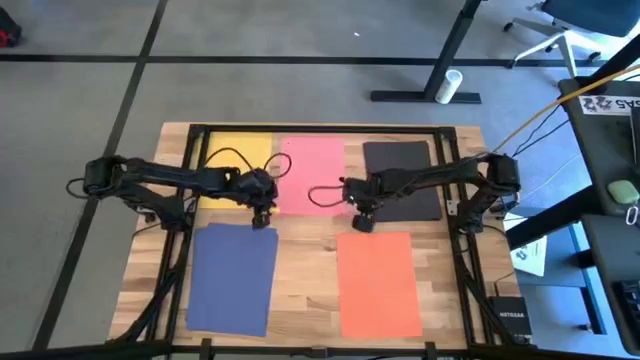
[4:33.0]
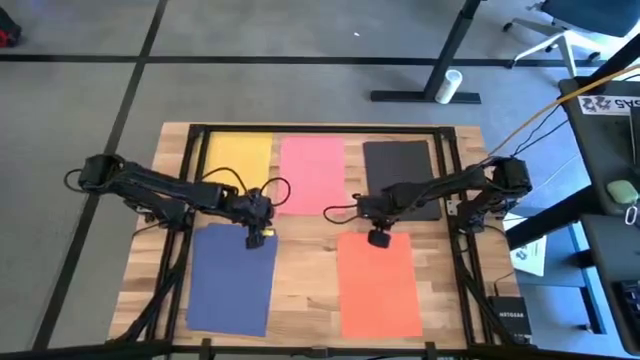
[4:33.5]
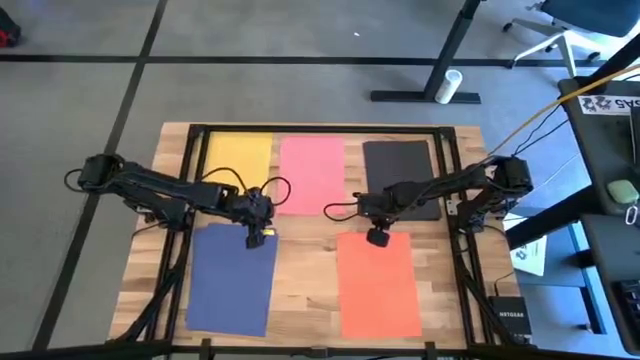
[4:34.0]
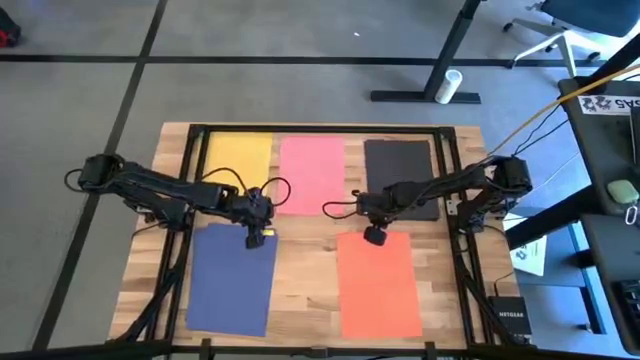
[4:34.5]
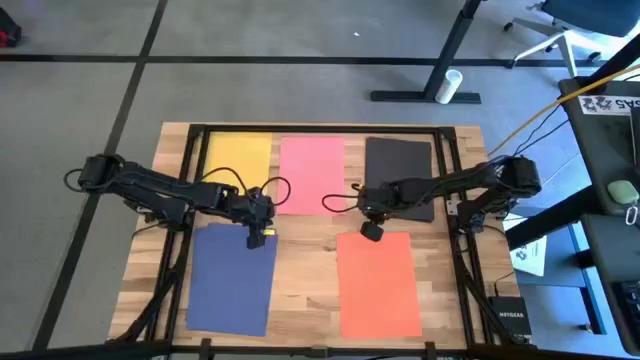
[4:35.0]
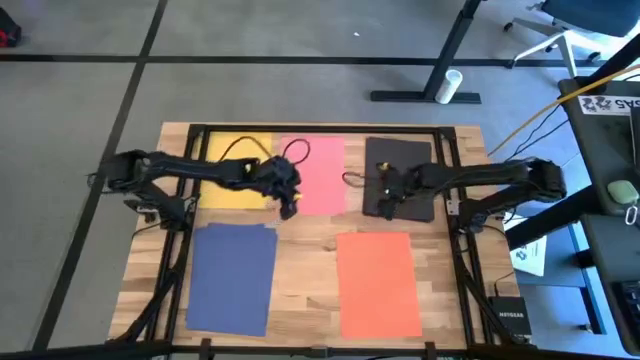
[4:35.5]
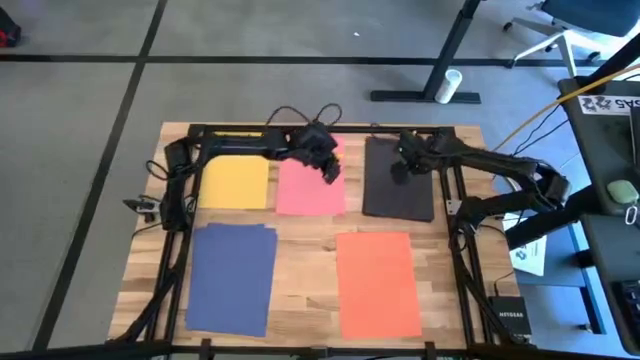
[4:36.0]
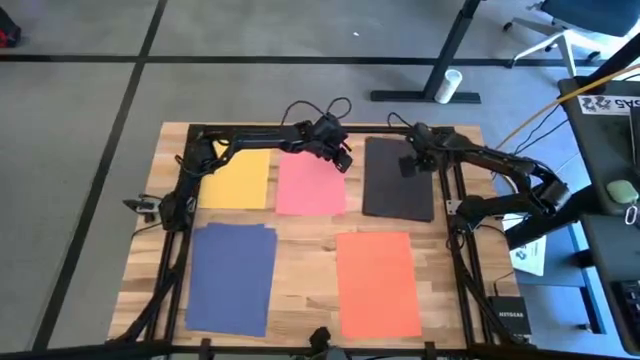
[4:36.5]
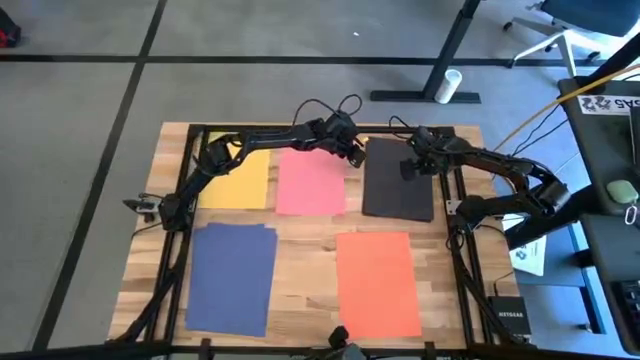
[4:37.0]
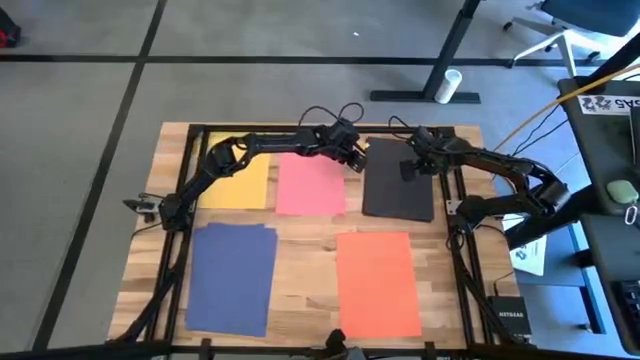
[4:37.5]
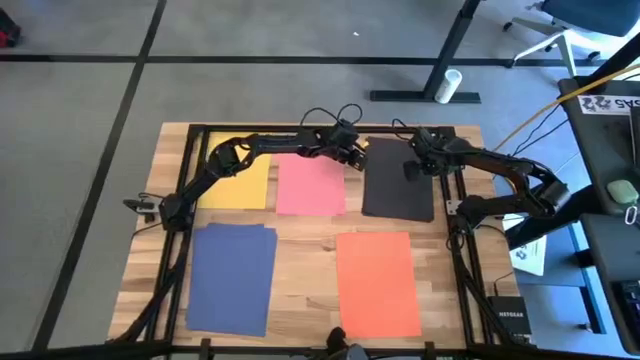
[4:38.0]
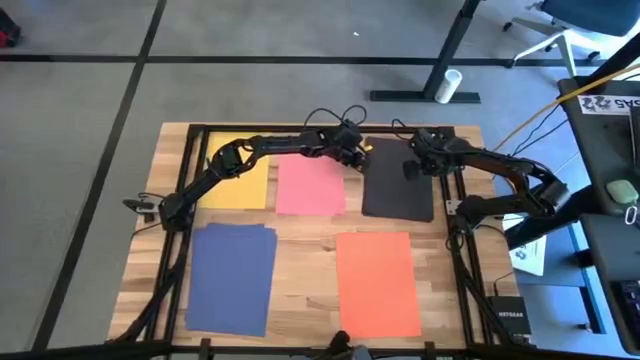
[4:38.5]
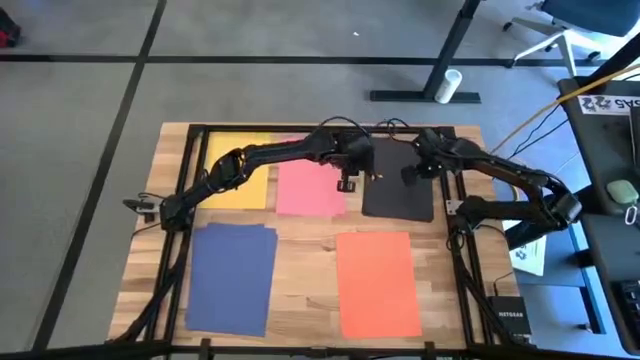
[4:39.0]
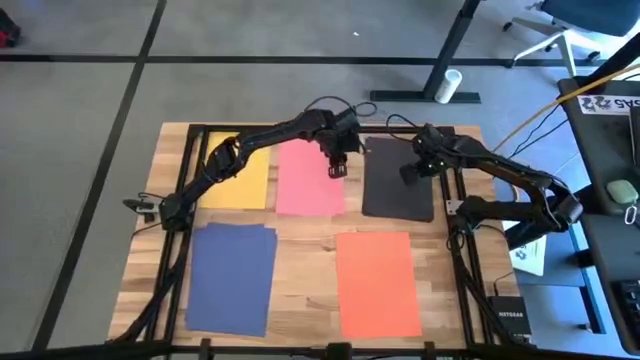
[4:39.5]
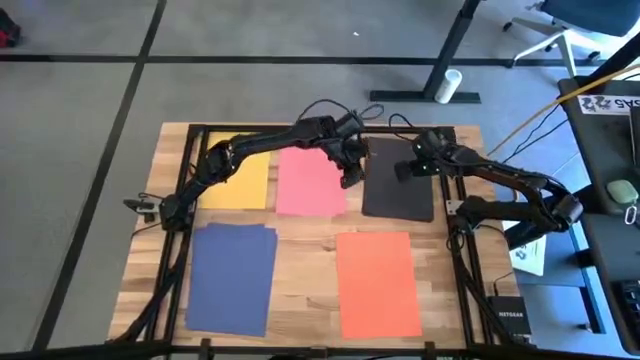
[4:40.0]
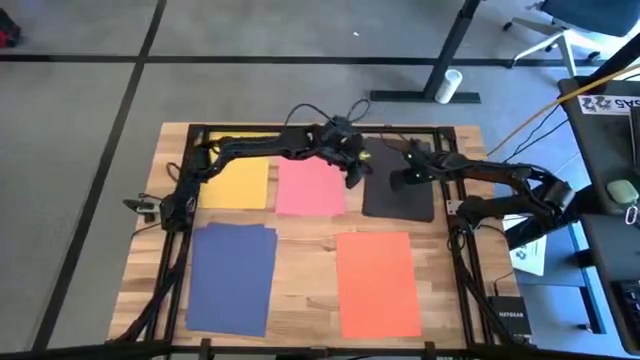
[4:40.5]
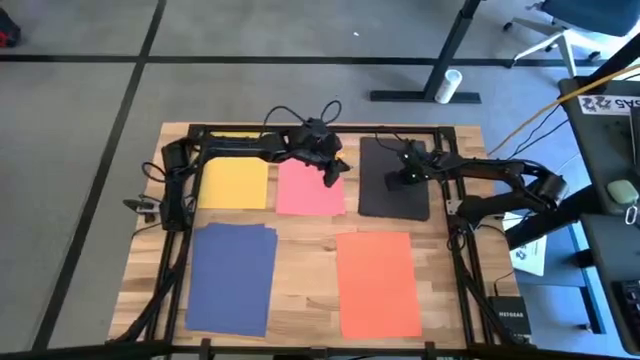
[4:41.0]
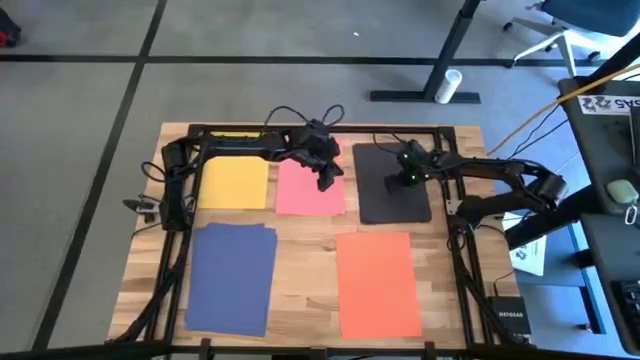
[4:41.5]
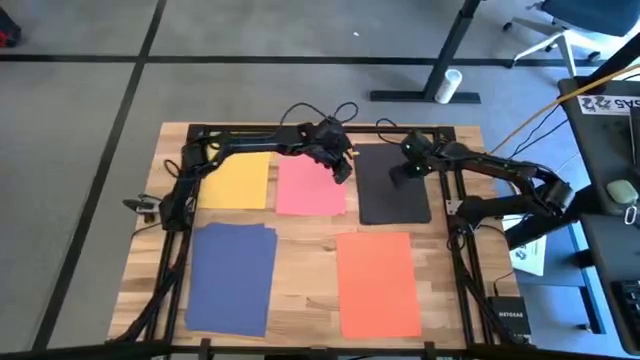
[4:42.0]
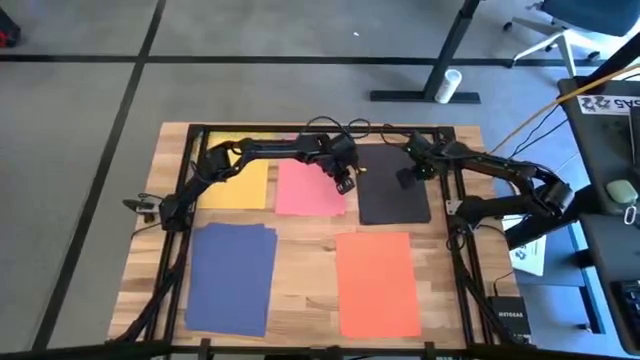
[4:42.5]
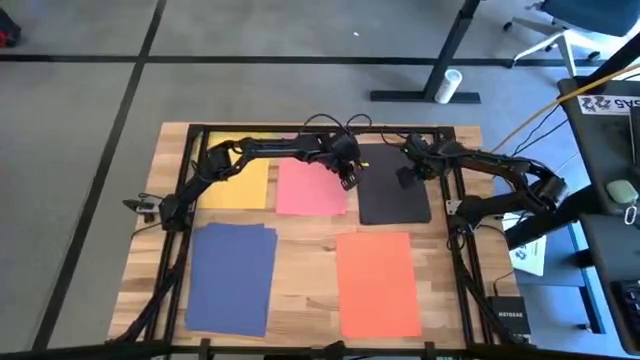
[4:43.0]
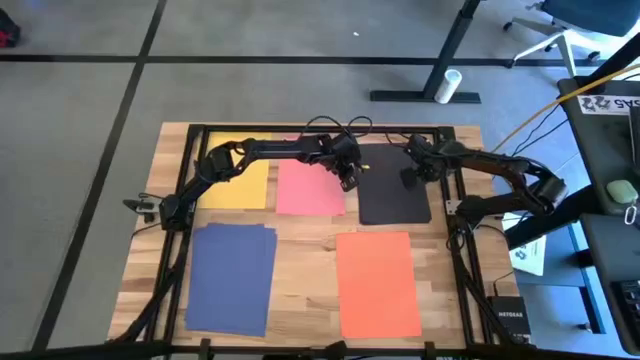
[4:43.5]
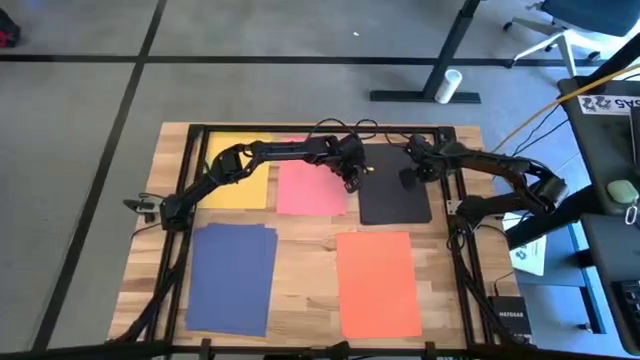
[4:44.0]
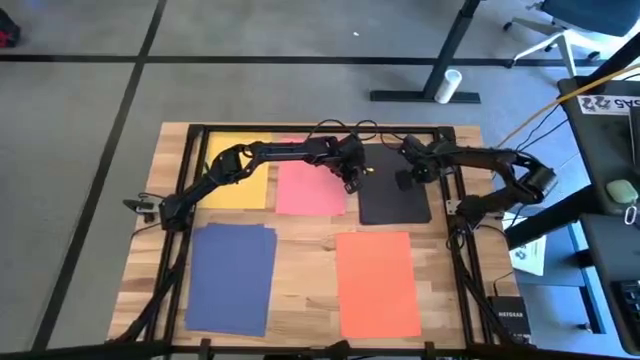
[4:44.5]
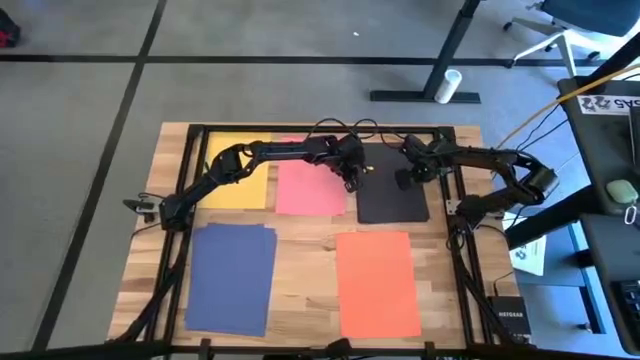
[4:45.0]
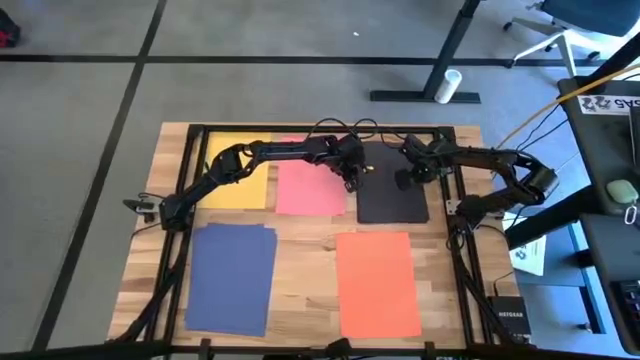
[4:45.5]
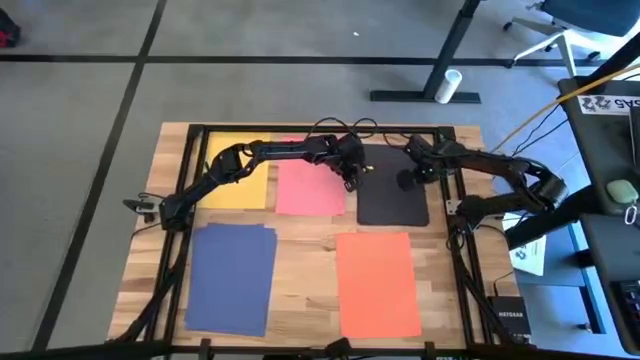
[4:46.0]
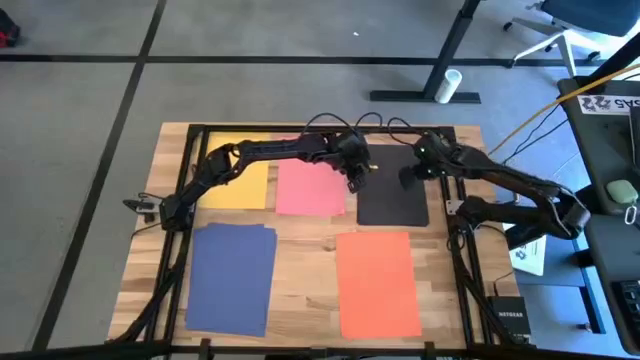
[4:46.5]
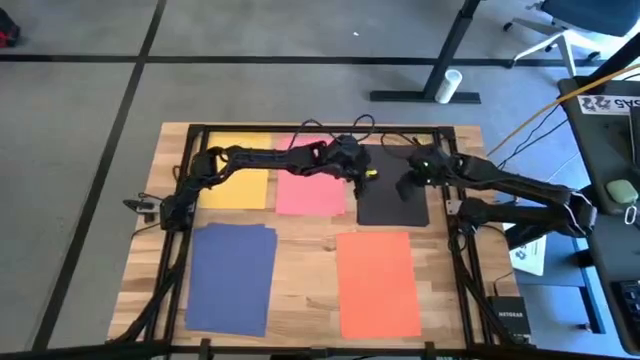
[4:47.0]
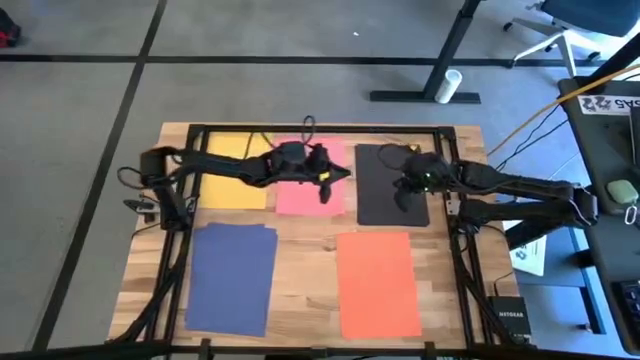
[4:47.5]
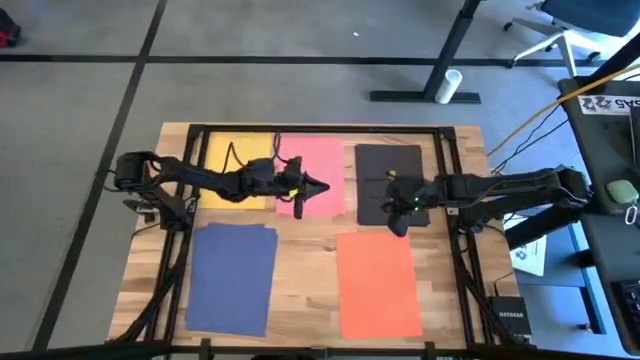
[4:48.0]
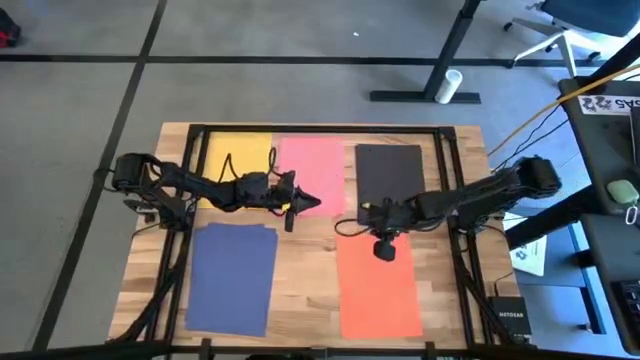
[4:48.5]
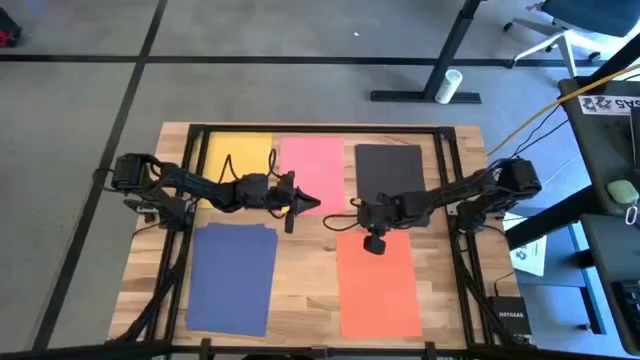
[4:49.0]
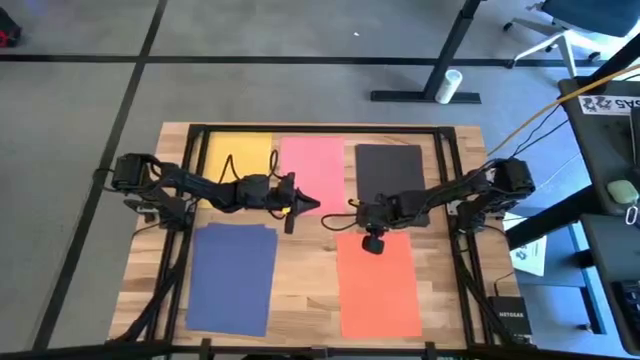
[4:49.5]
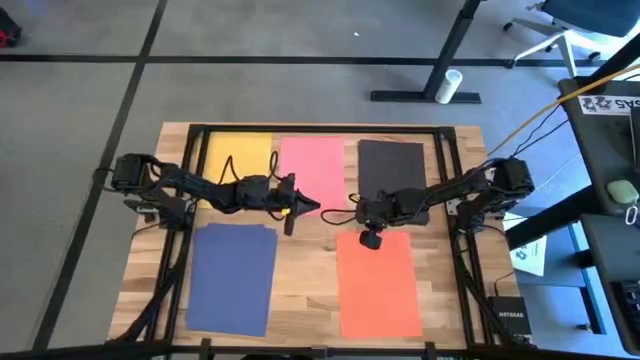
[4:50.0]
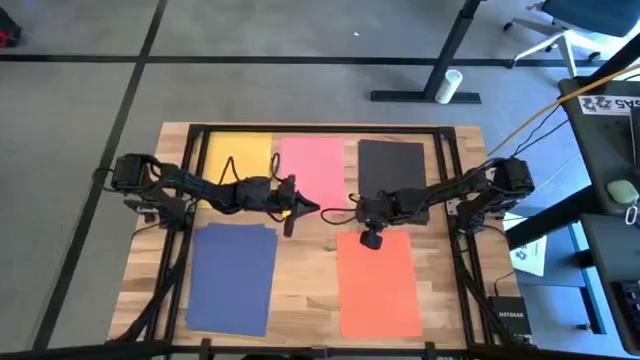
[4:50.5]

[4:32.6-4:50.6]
Task: Organize paper
Adjust the stacked black papers
